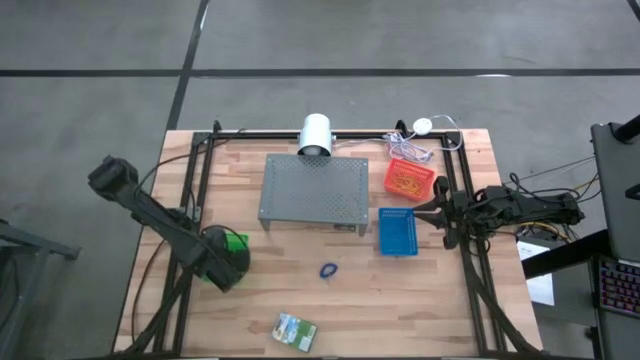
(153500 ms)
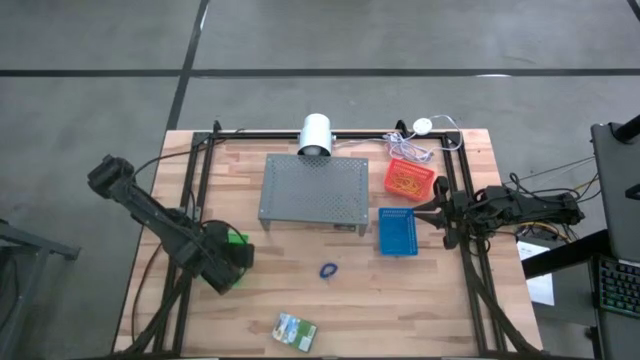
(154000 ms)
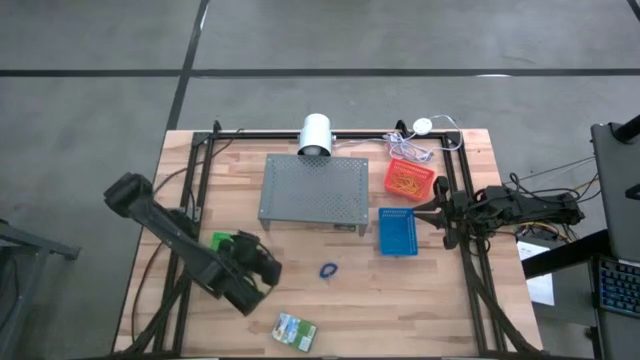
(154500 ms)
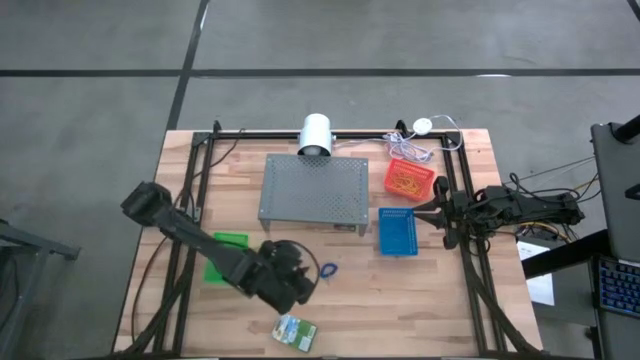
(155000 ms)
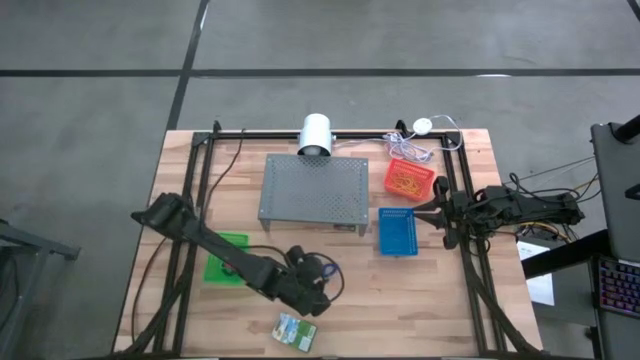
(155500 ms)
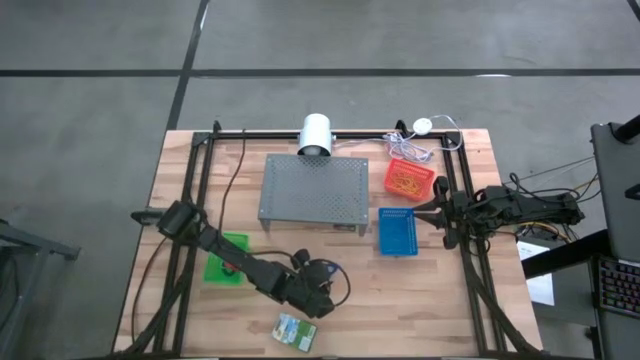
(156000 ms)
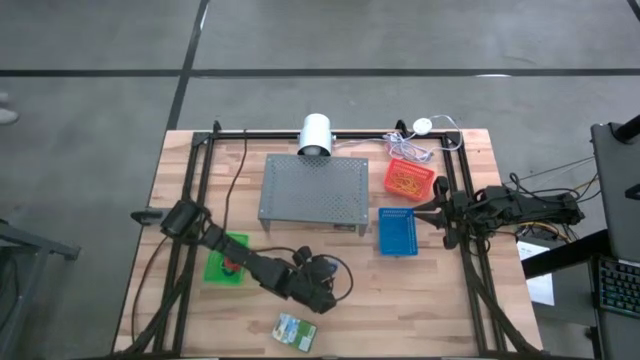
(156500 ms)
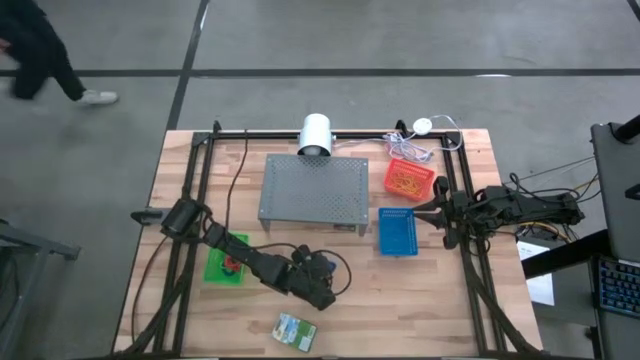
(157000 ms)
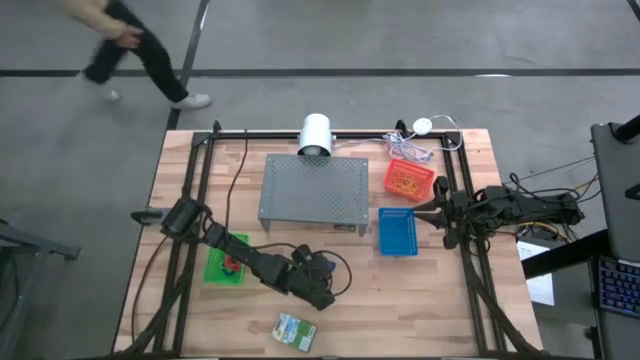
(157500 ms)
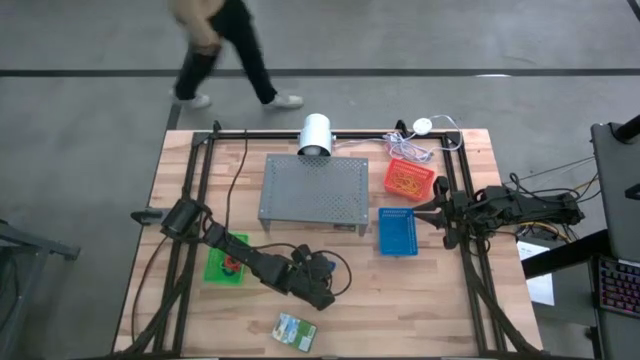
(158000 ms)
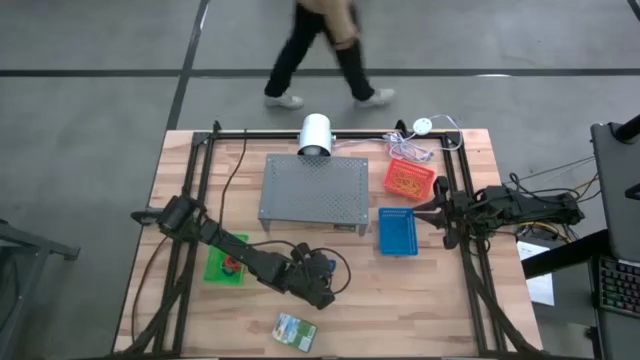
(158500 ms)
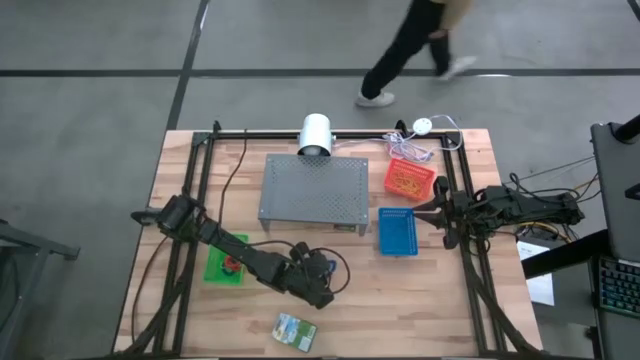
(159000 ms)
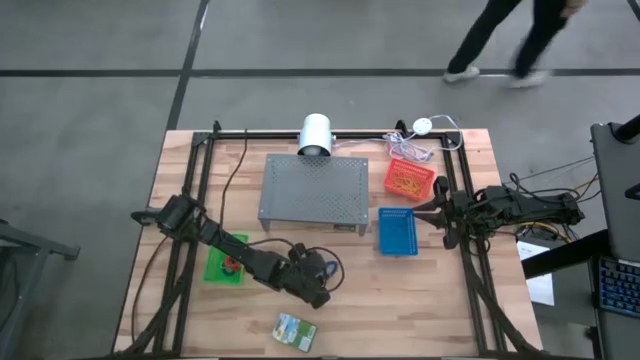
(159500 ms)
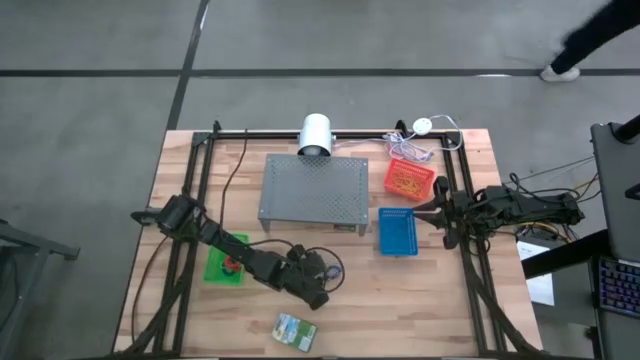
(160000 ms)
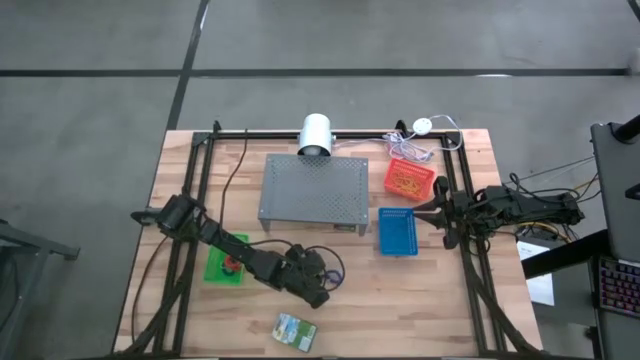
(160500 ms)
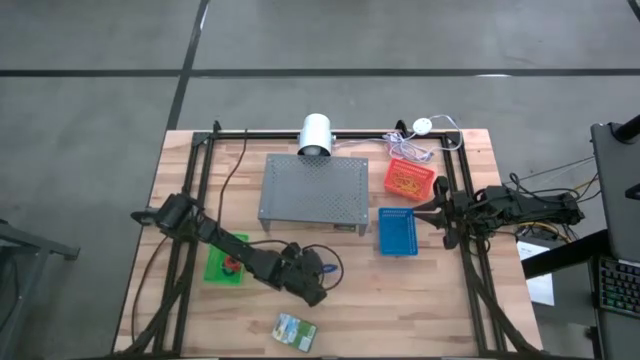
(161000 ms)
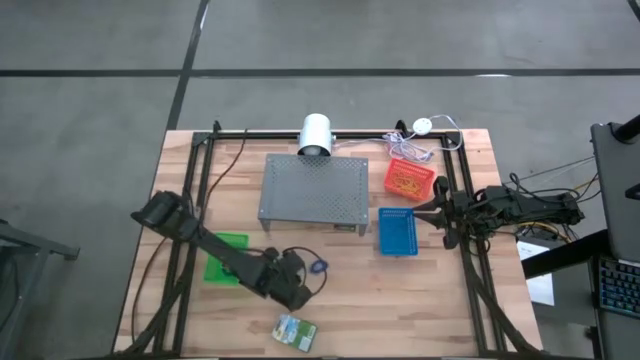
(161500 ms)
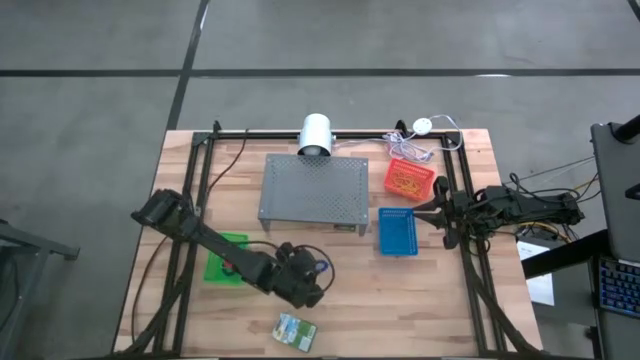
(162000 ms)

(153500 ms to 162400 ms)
Task: Pick & Place Office Desk Supplies
Put the blue spring keychain into the green bin

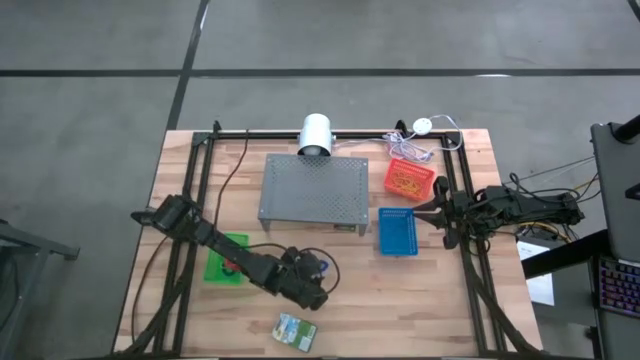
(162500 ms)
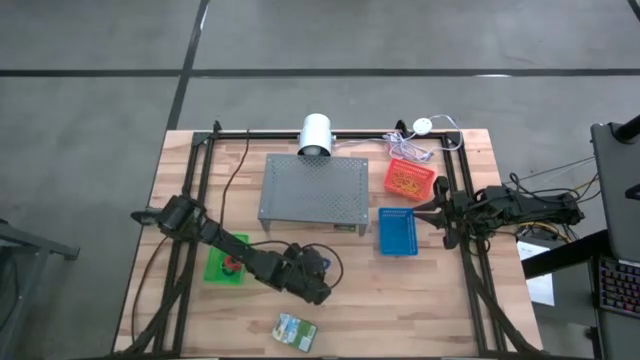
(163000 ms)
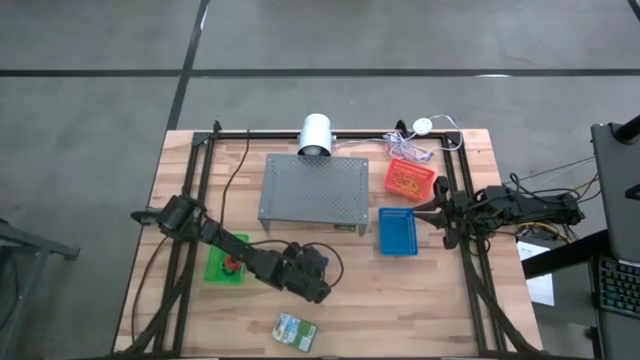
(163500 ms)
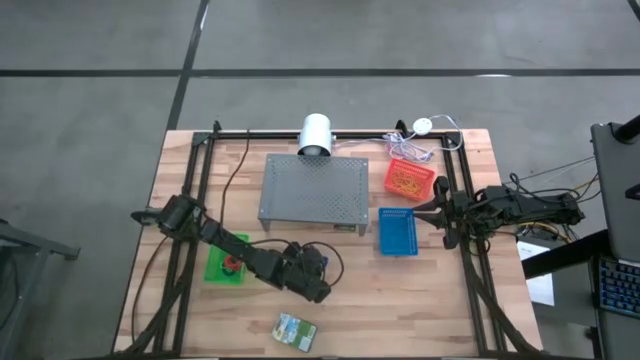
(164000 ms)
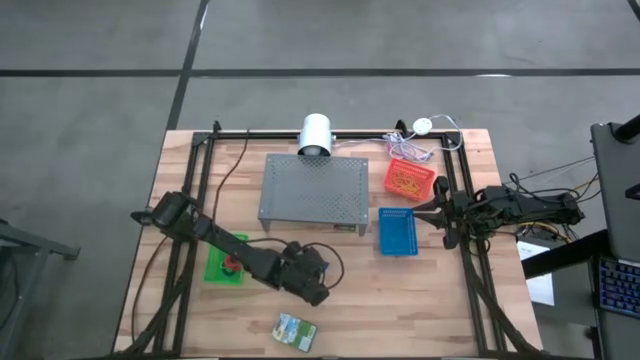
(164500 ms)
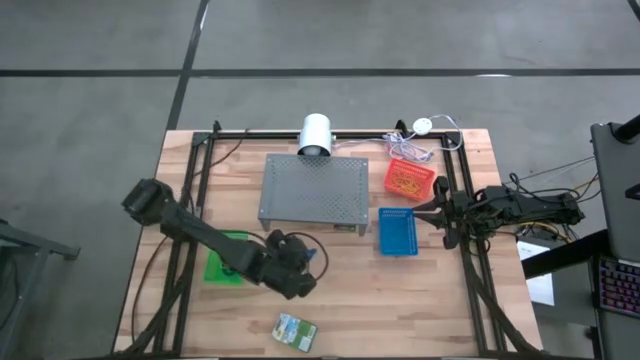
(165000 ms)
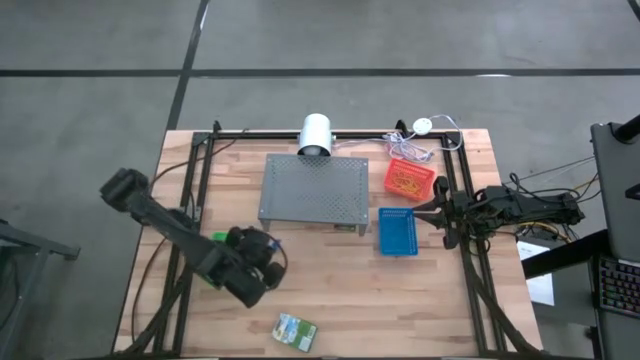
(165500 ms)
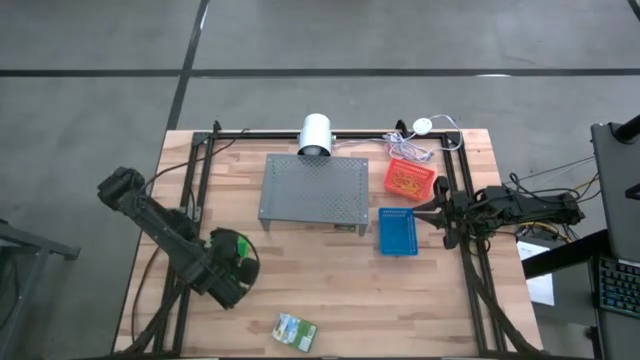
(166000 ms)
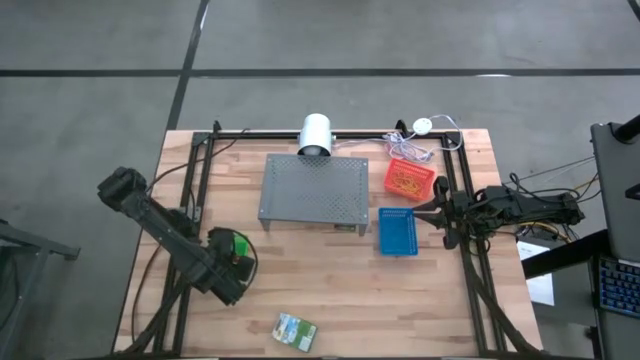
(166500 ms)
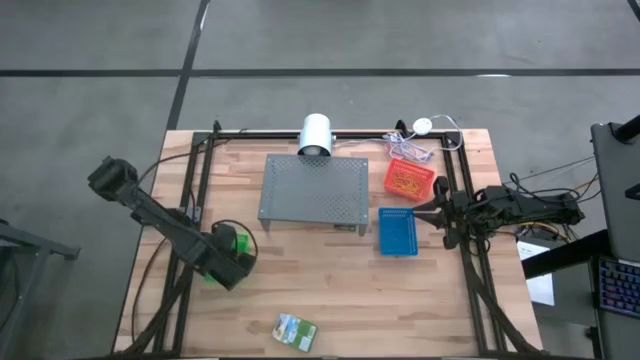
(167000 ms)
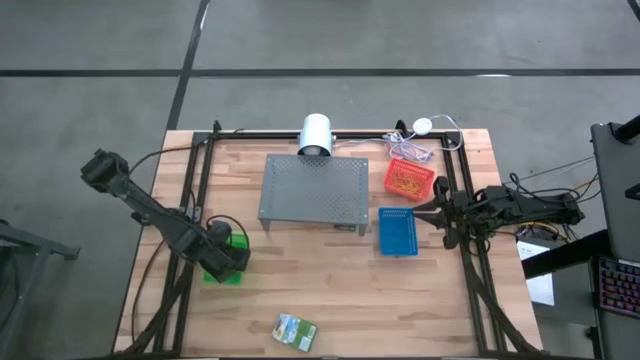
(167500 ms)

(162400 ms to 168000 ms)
Put the blue spring keychain into the green bin

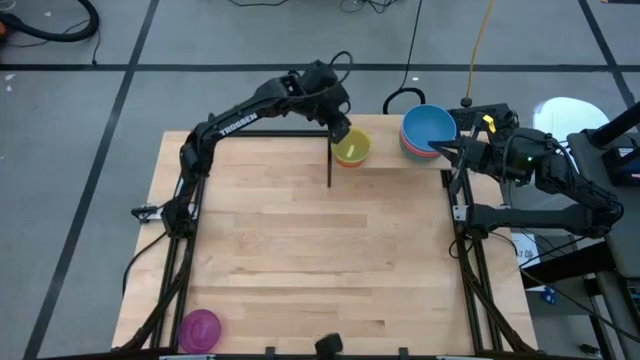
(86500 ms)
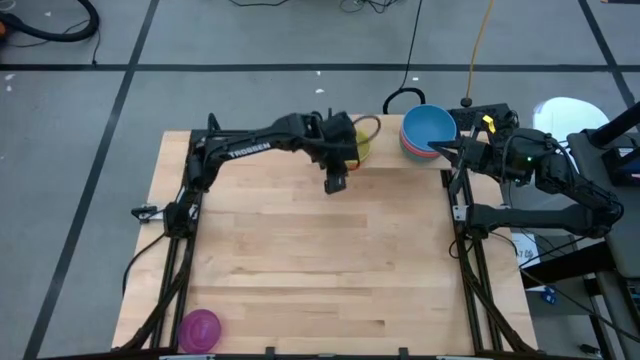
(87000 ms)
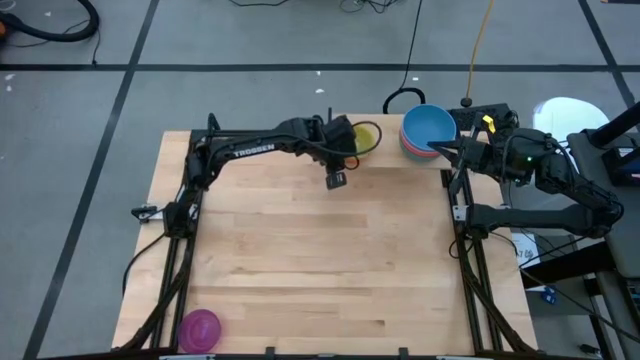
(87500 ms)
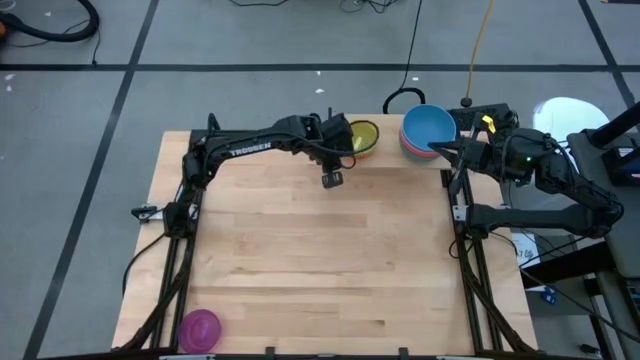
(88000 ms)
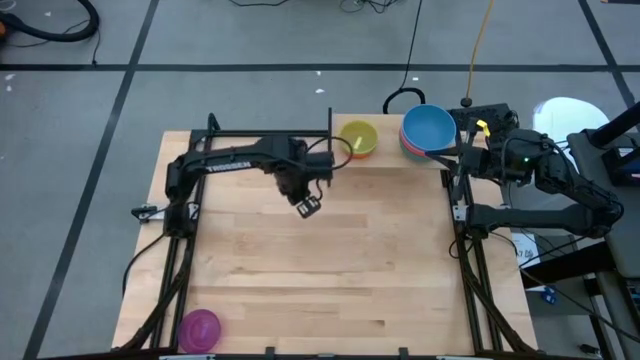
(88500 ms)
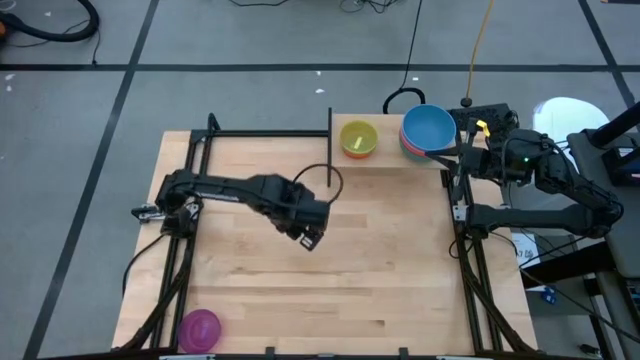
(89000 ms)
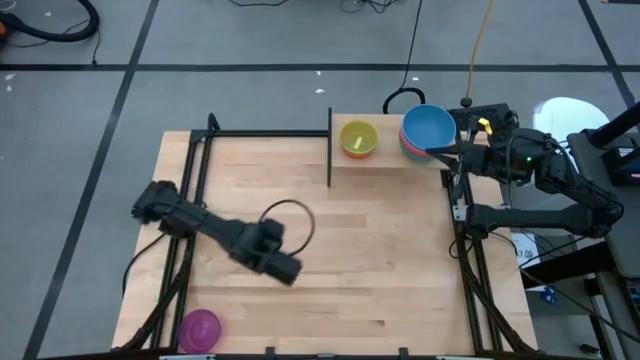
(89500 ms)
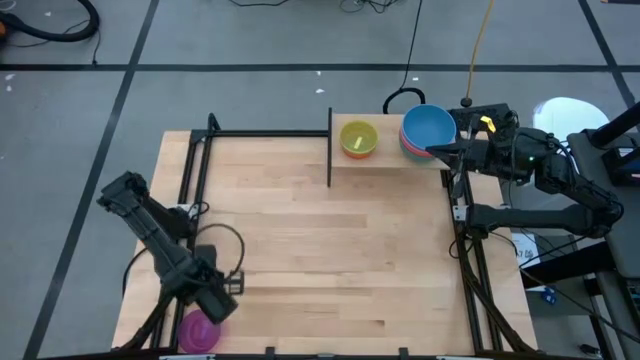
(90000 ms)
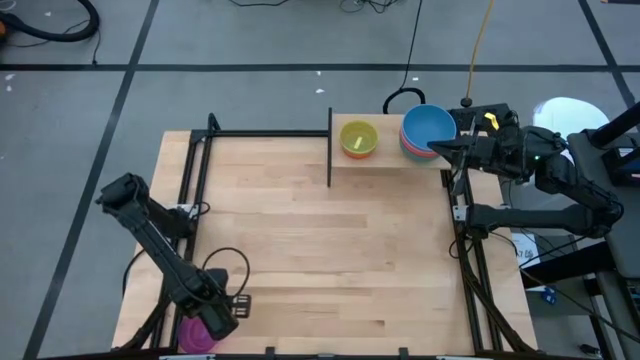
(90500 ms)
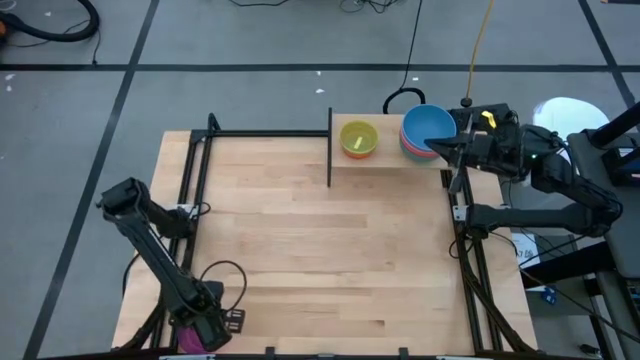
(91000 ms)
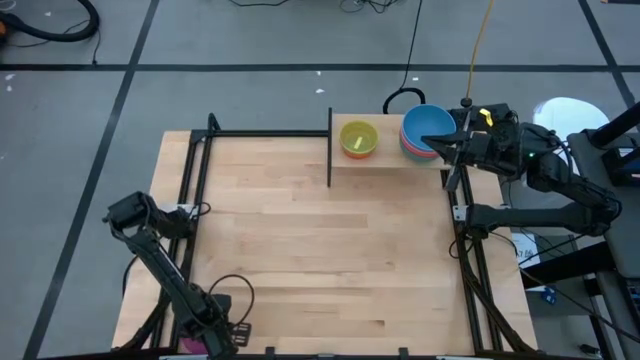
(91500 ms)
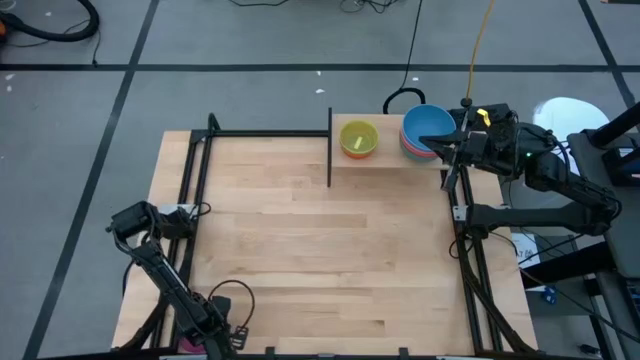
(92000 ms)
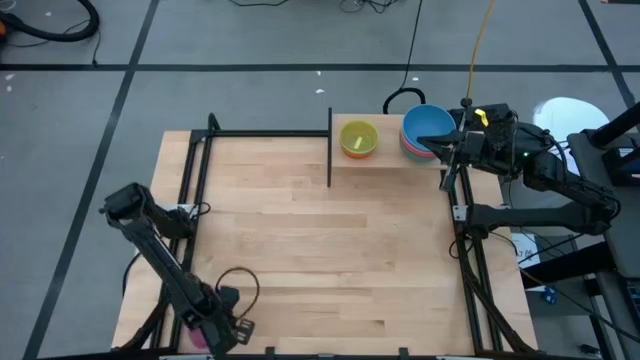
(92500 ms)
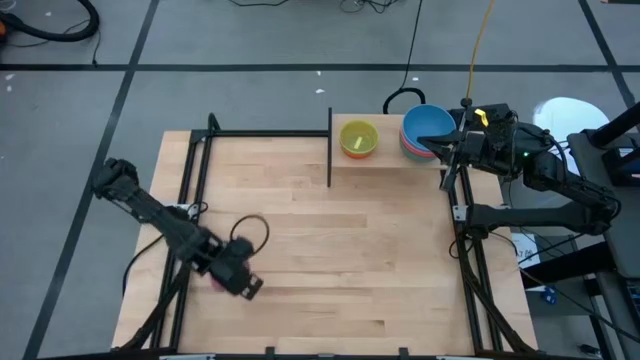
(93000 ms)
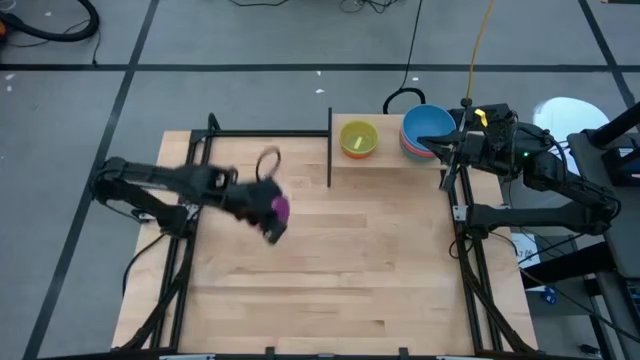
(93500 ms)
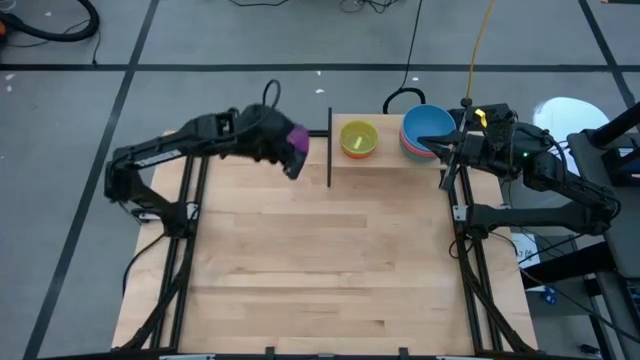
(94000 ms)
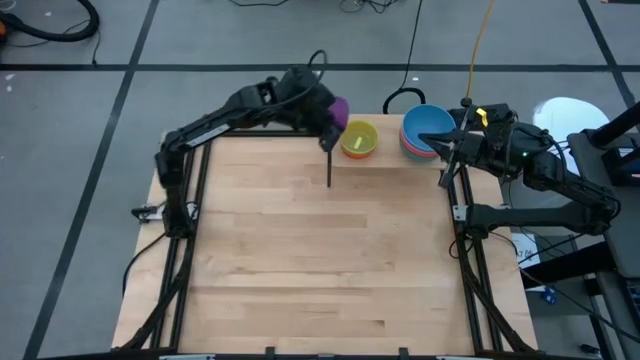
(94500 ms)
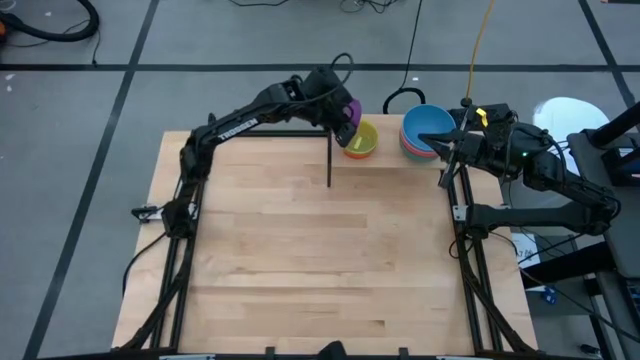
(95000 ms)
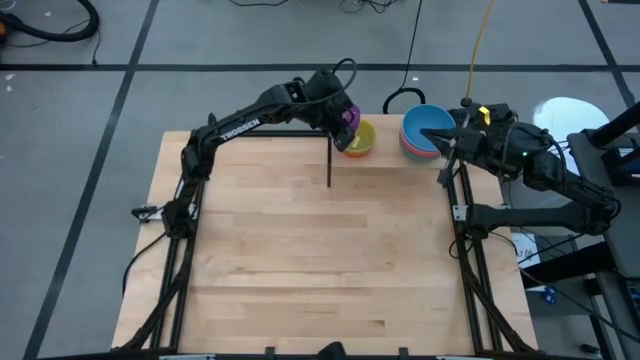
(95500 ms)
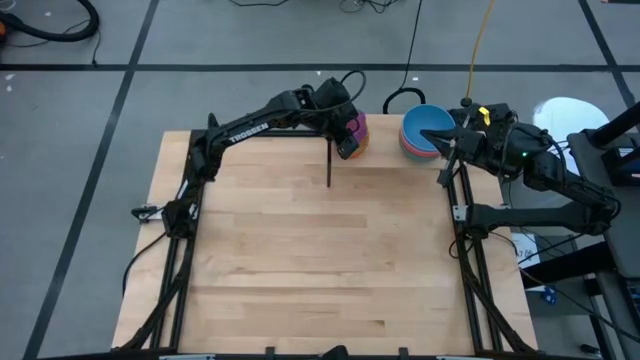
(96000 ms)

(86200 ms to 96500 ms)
Task: Place and stack bowls onto a shelf
Stack the violet bowl inside the yellow bowl on the shelf
